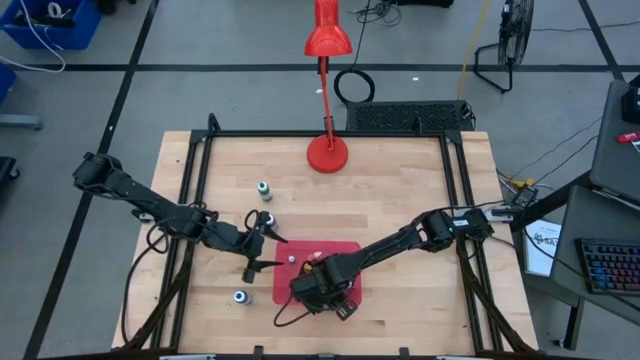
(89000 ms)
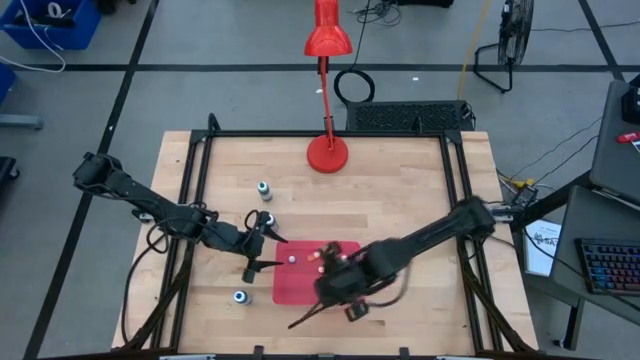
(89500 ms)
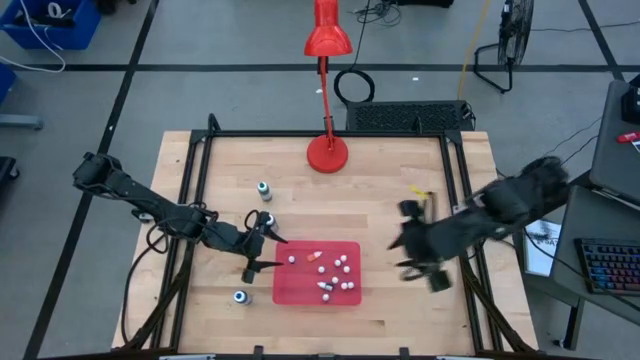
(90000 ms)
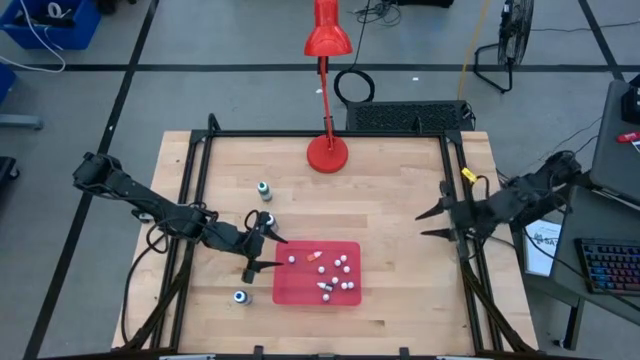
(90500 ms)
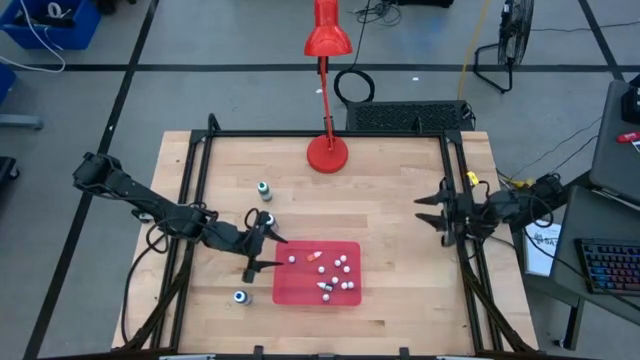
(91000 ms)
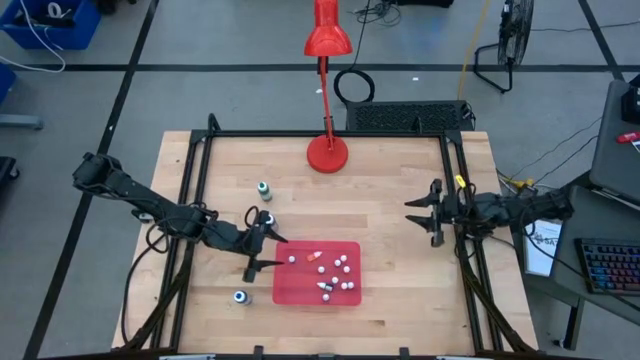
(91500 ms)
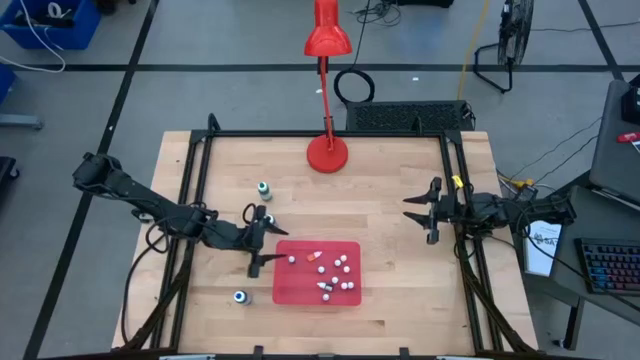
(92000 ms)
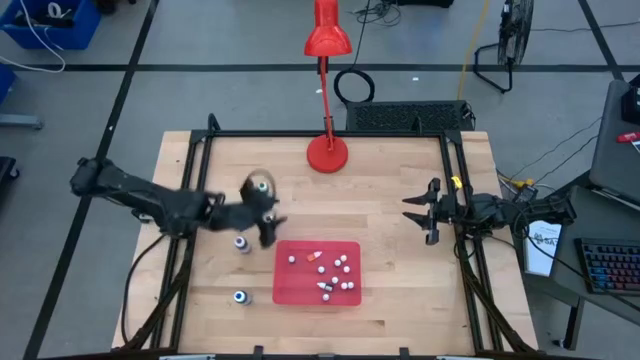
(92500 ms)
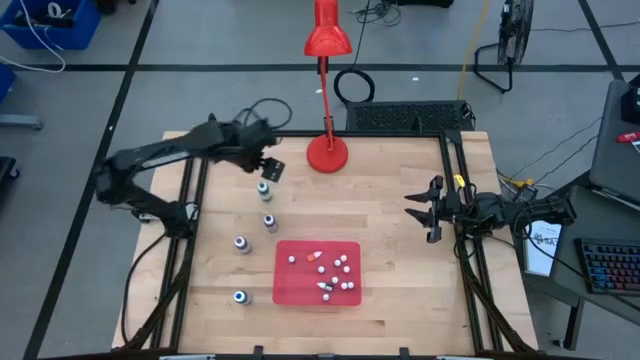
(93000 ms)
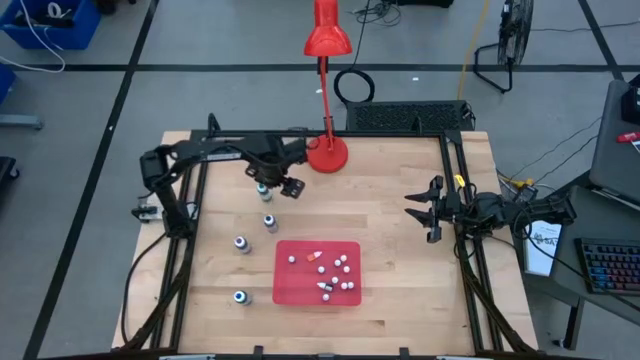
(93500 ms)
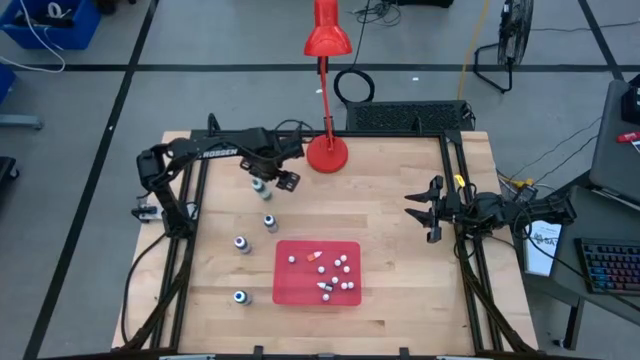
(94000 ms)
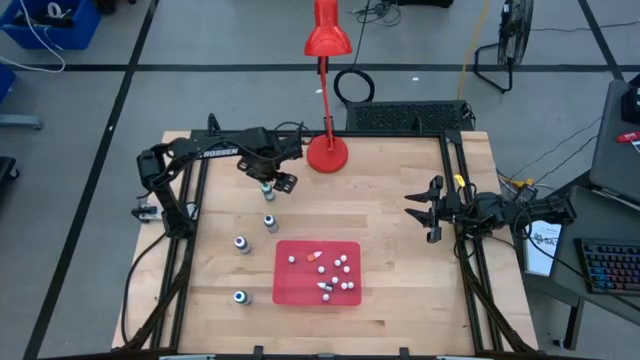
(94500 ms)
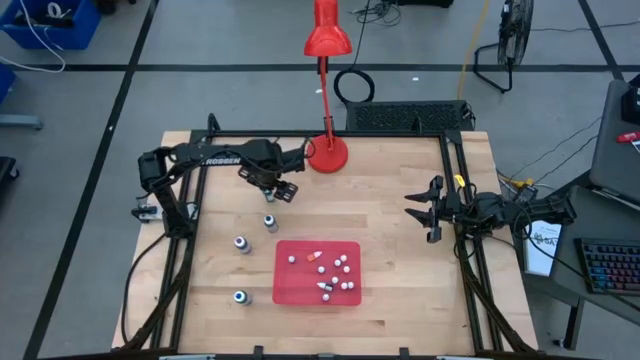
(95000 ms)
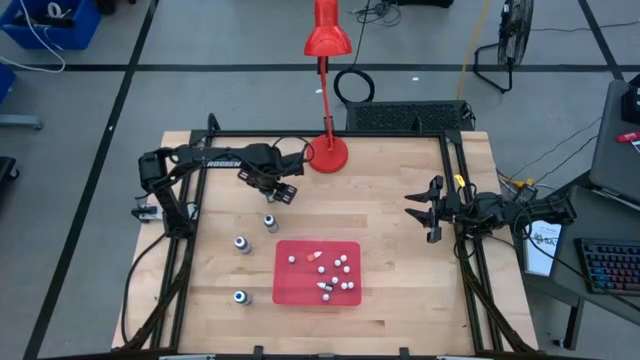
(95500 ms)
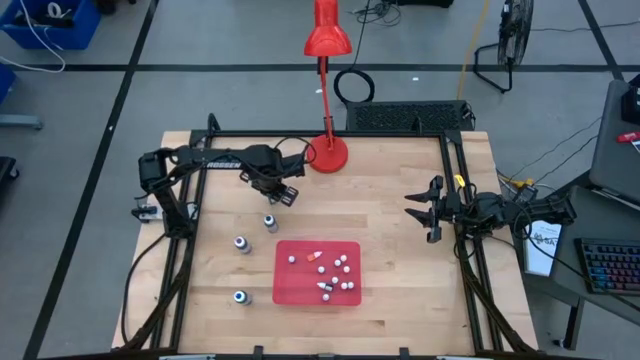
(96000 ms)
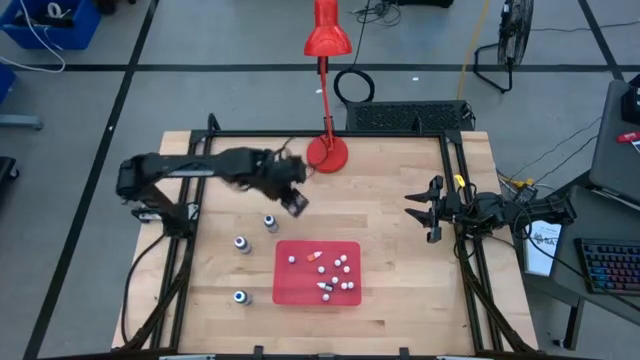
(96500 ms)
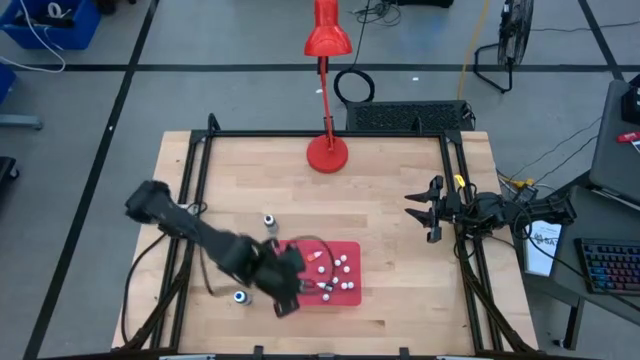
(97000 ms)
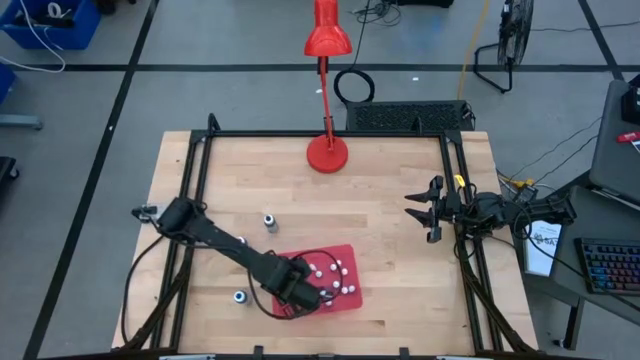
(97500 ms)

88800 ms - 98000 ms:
Task: Pick & Place food coloring
Put the big green food coloring bottle into the pink container

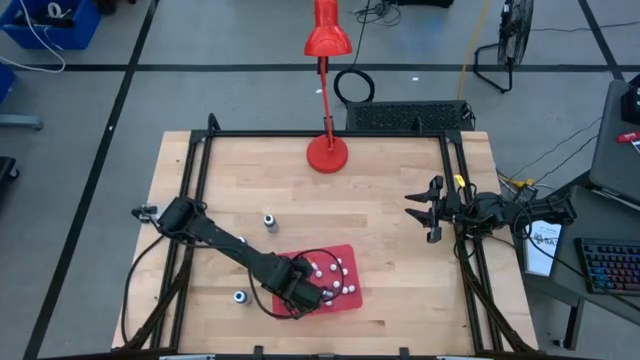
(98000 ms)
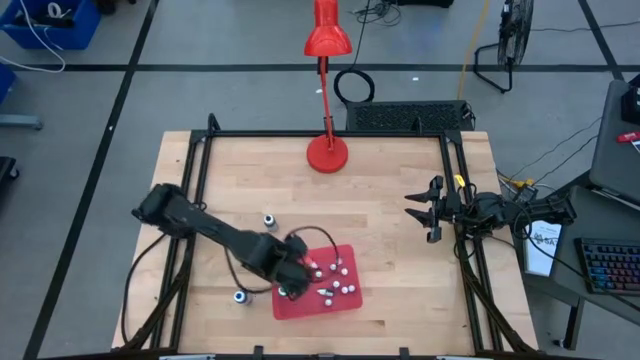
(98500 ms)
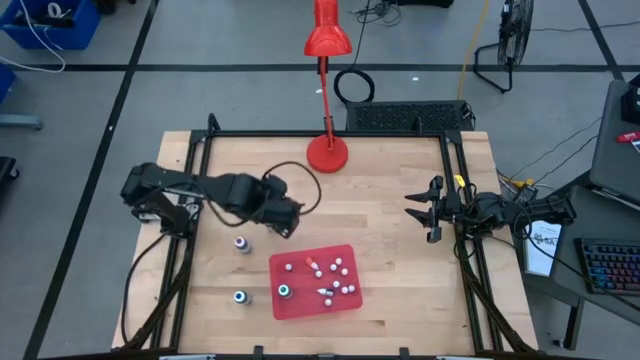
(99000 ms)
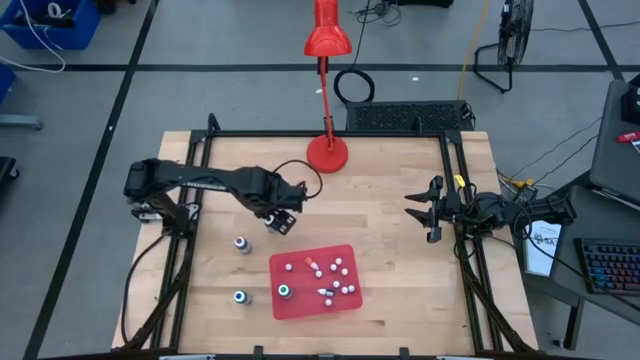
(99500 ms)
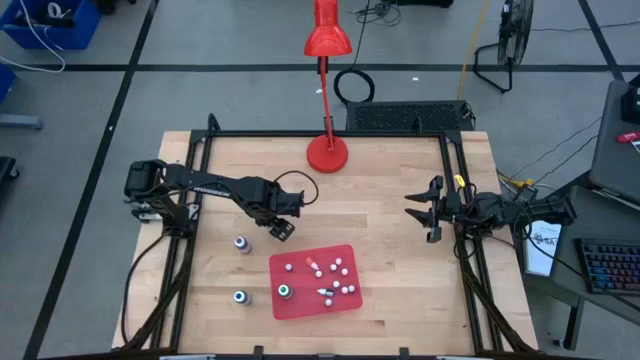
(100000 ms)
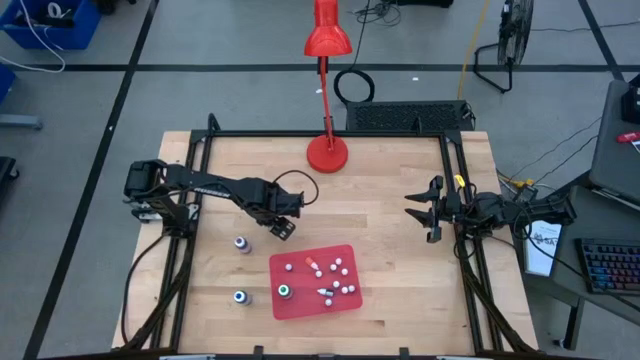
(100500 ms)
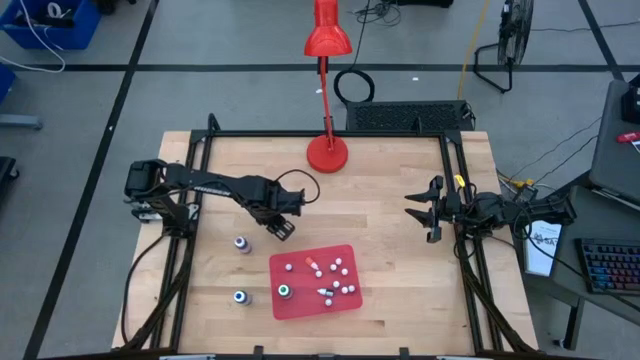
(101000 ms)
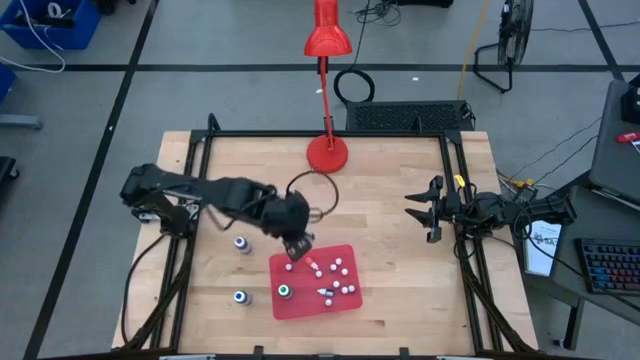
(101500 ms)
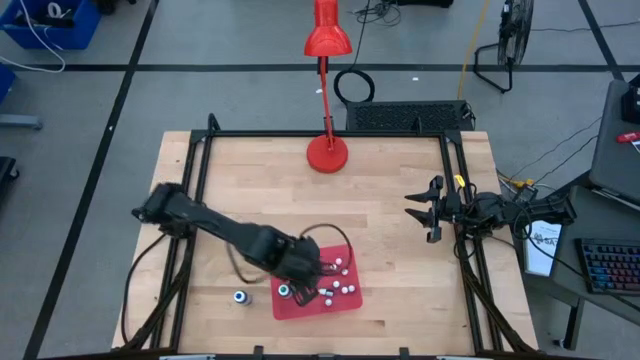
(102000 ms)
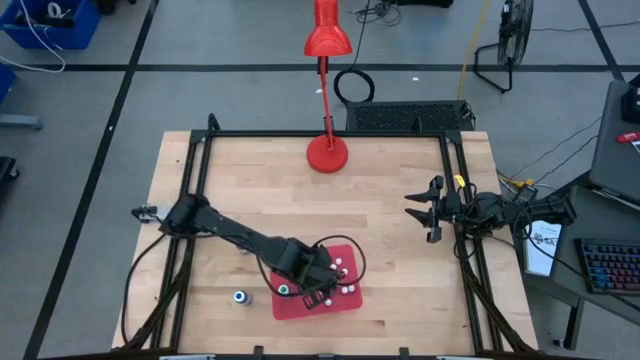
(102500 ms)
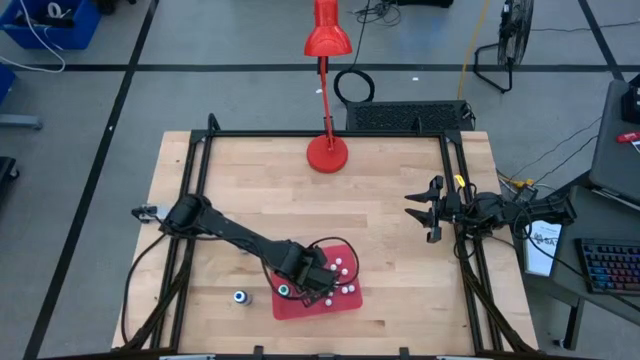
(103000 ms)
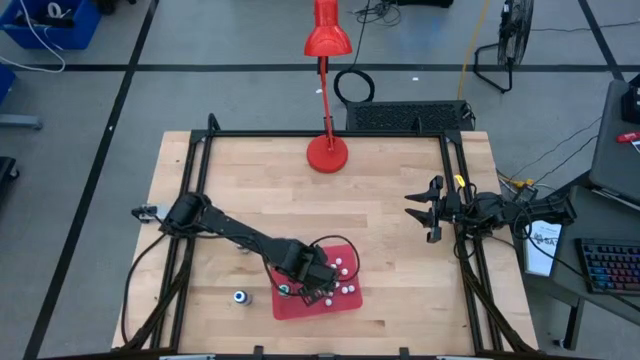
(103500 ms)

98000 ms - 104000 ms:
Put the big black food coloring bottle into the pink container

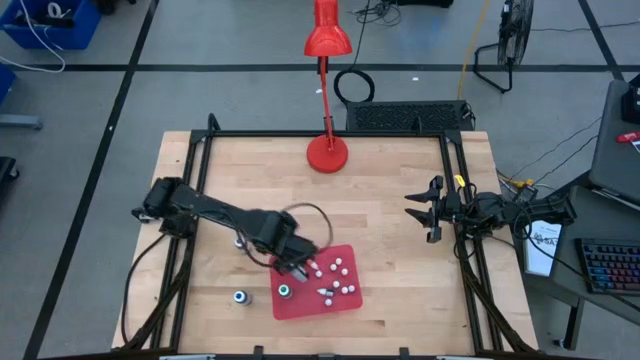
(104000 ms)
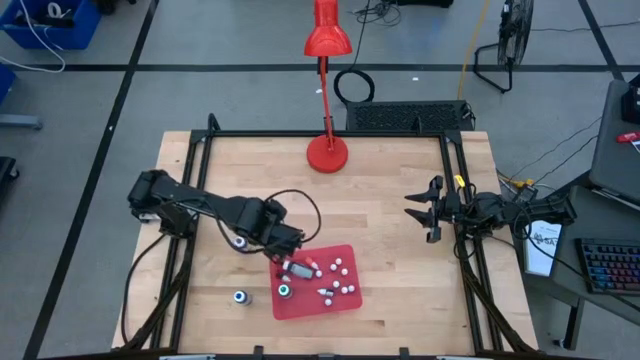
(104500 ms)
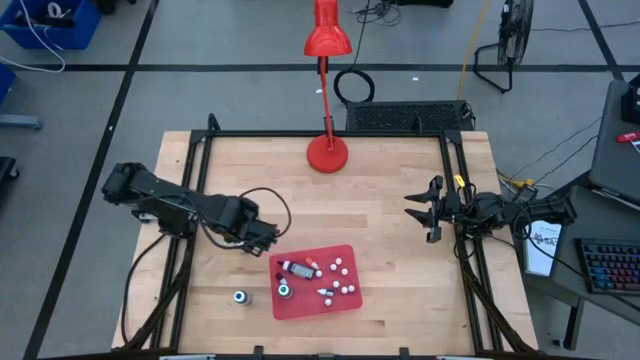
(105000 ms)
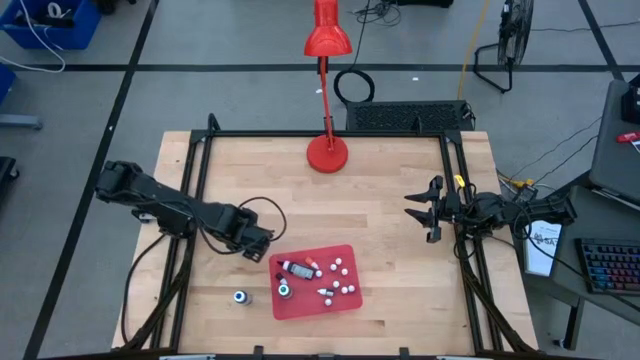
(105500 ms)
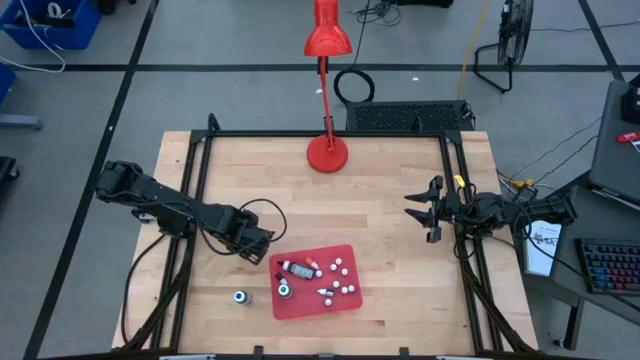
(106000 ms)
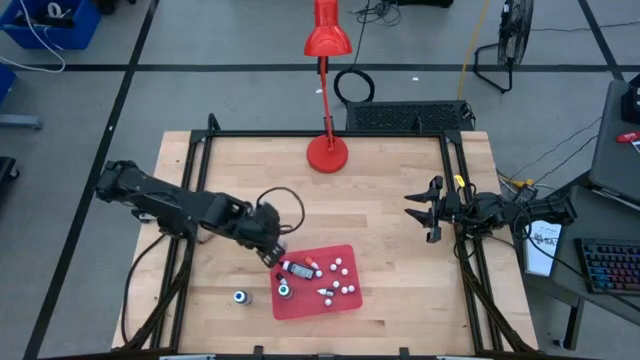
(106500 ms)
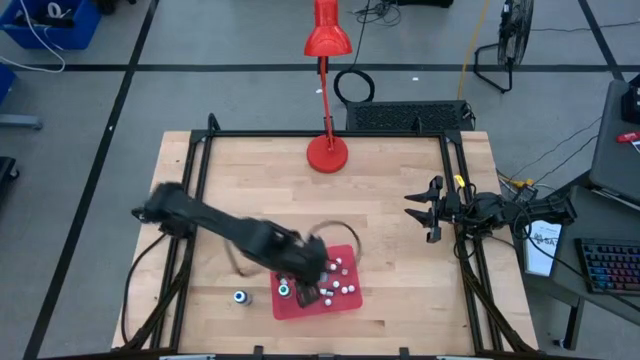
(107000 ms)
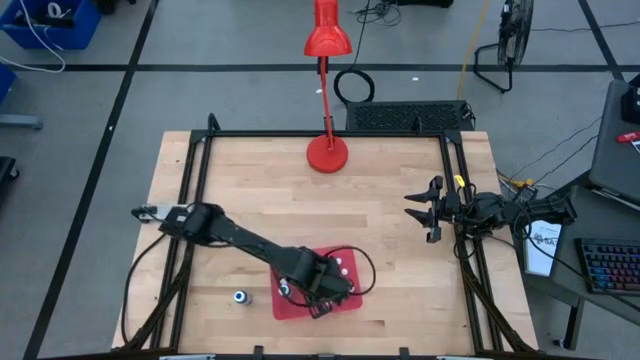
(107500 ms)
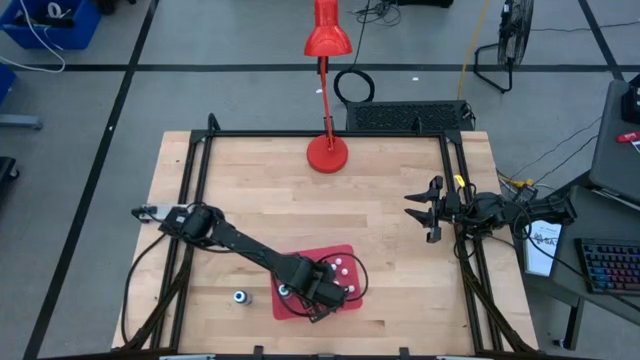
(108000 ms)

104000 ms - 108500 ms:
Put the big violet food coloring bottle into the pink container

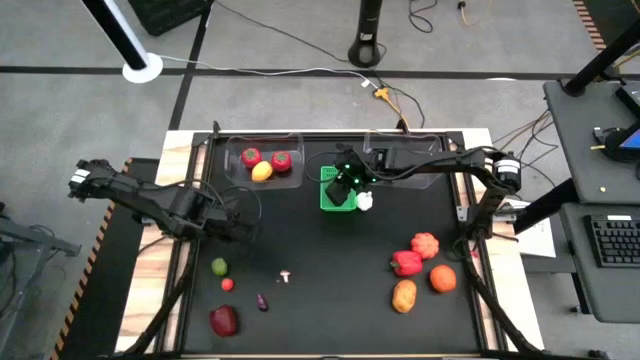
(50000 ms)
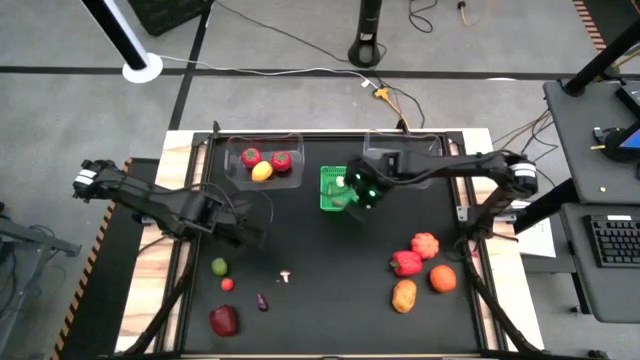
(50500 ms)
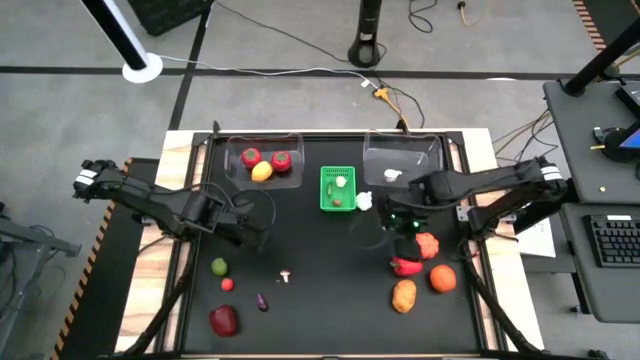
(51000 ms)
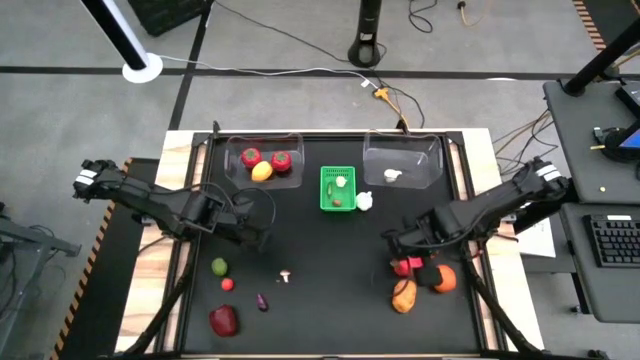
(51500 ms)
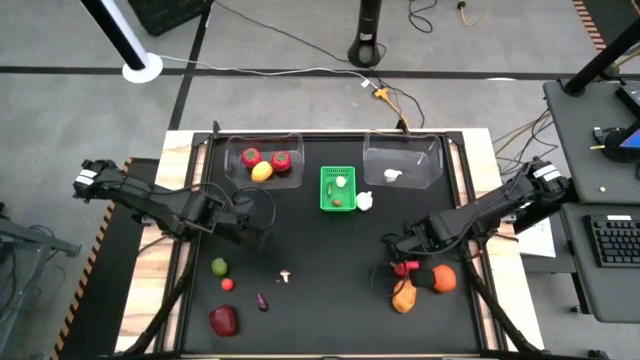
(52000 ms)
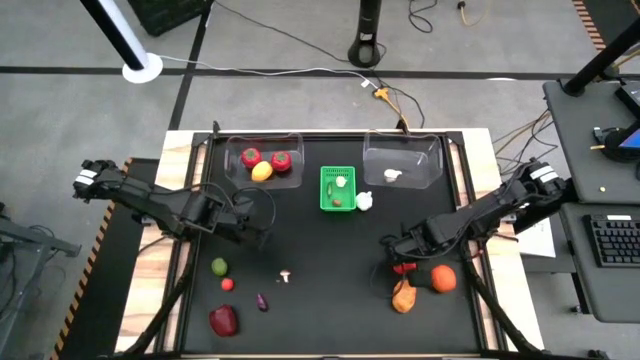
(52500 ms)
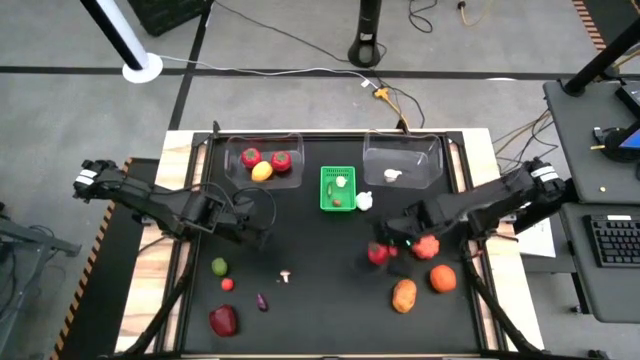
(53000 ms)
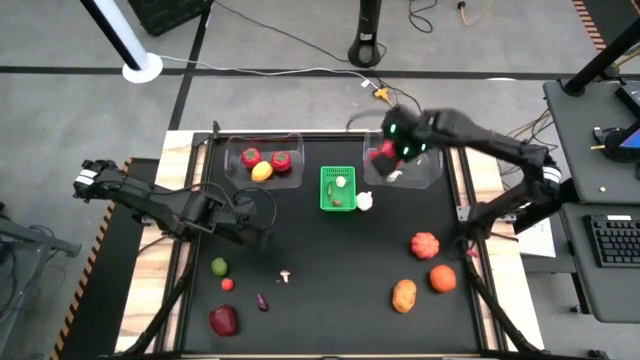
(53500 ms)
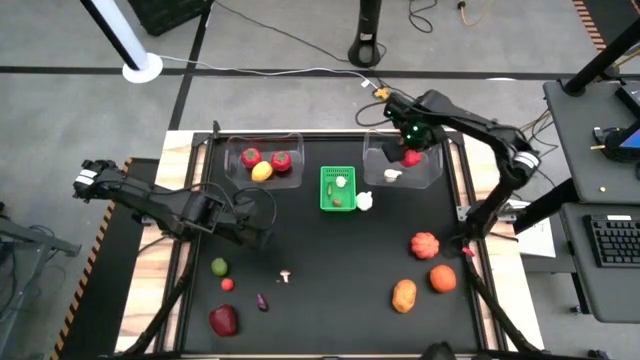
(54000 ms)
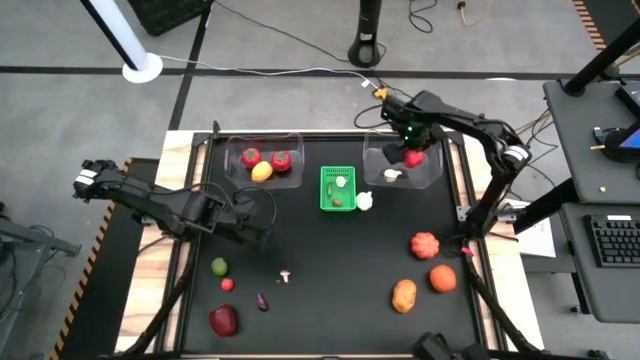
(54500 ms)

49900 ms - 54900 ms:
Task: Sort produce into baskets
Put the red bell pepper into the right transparent bin
